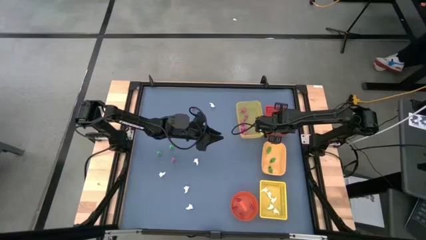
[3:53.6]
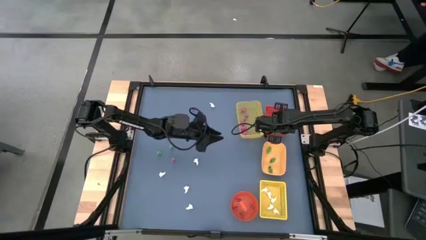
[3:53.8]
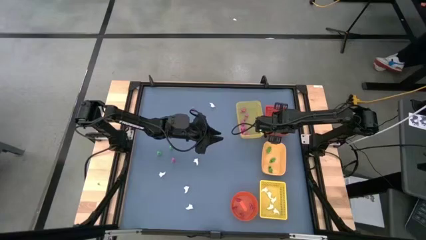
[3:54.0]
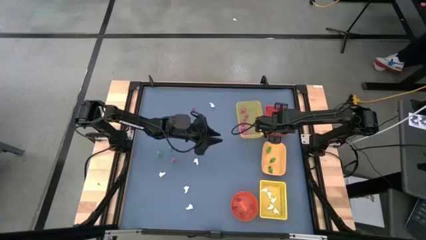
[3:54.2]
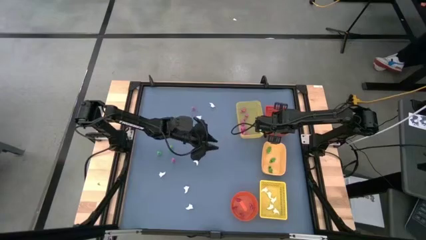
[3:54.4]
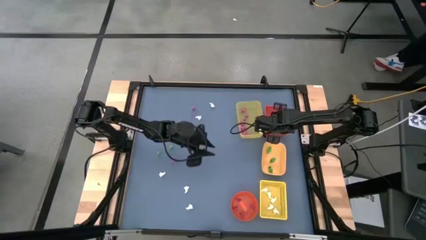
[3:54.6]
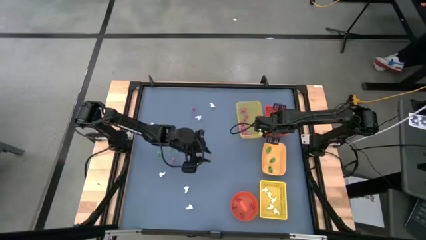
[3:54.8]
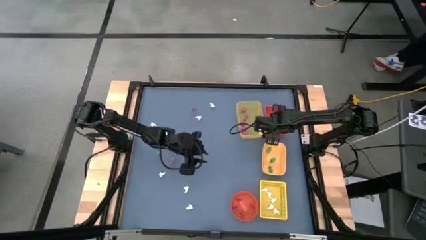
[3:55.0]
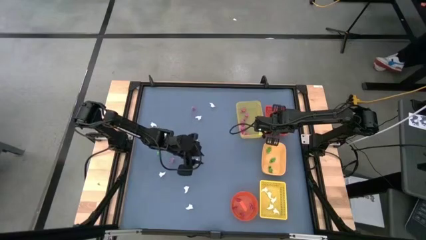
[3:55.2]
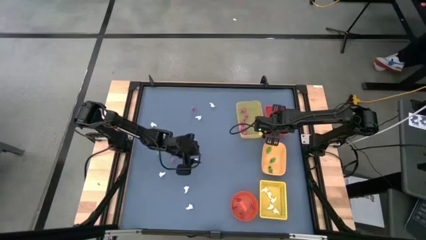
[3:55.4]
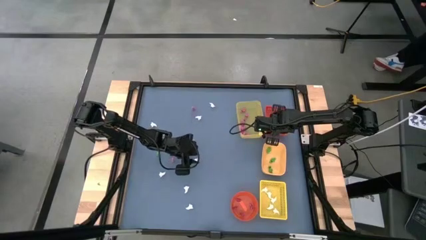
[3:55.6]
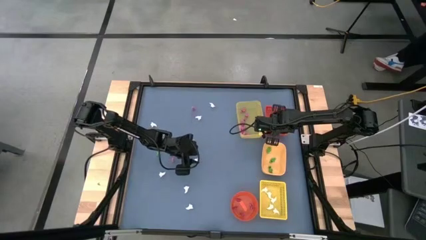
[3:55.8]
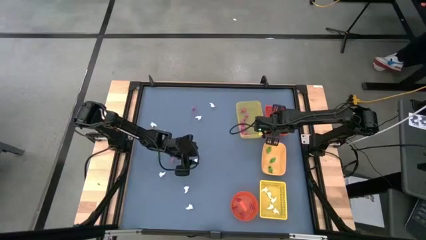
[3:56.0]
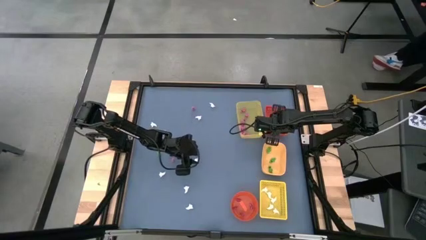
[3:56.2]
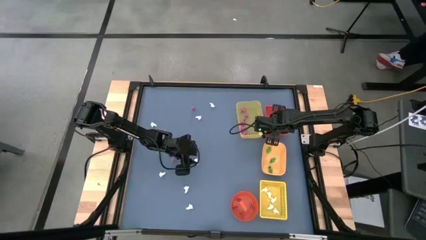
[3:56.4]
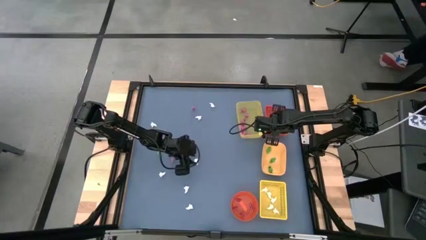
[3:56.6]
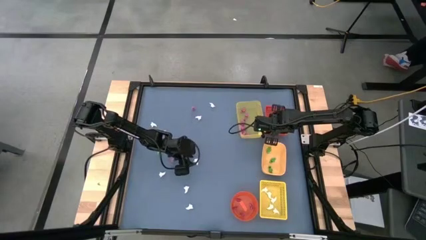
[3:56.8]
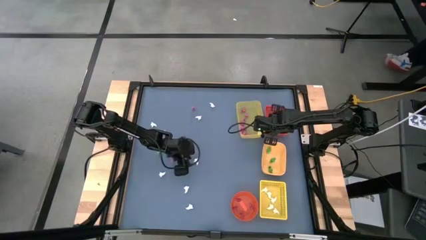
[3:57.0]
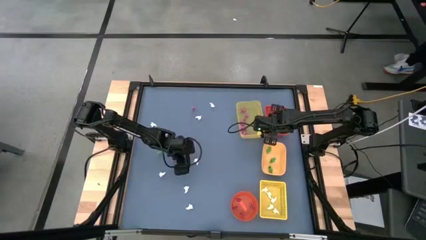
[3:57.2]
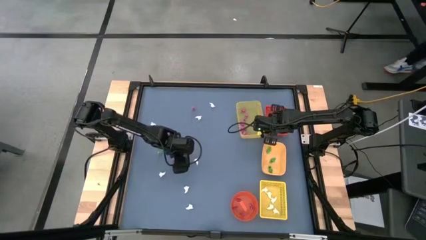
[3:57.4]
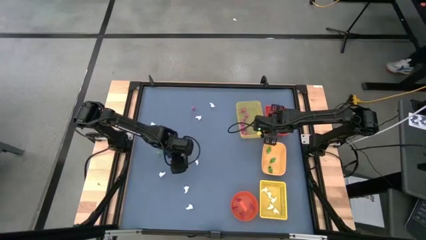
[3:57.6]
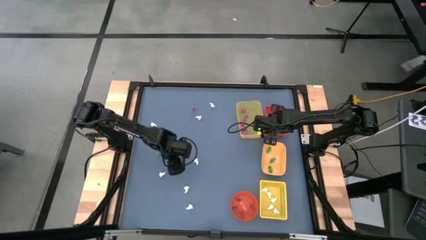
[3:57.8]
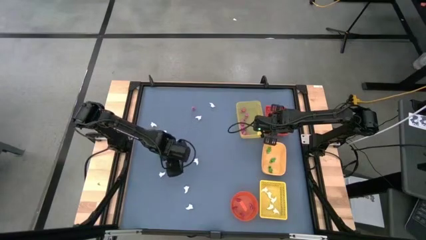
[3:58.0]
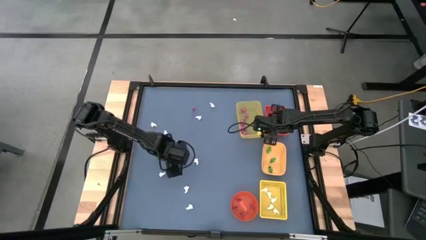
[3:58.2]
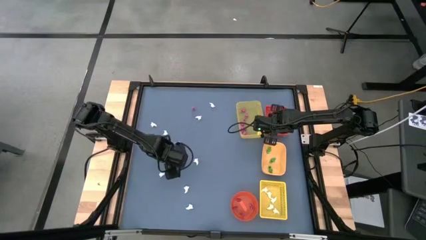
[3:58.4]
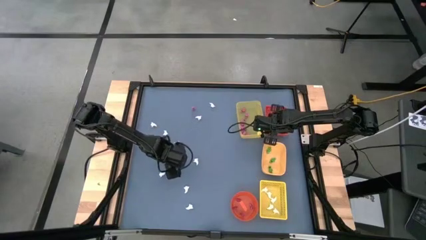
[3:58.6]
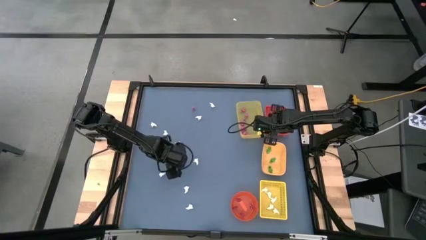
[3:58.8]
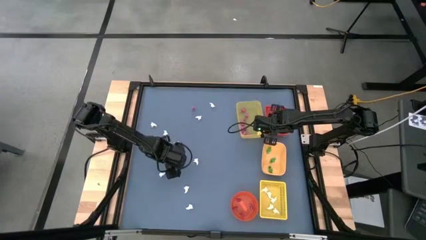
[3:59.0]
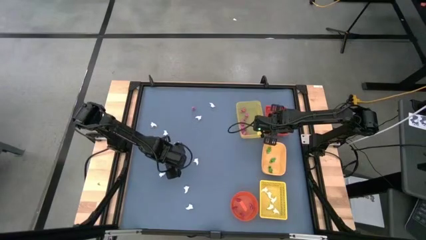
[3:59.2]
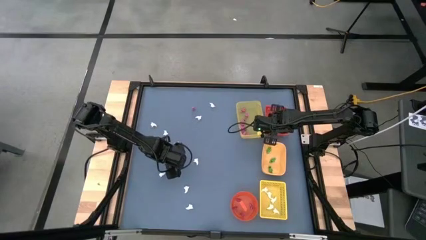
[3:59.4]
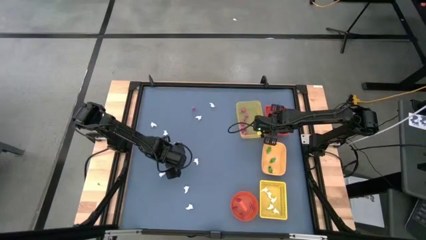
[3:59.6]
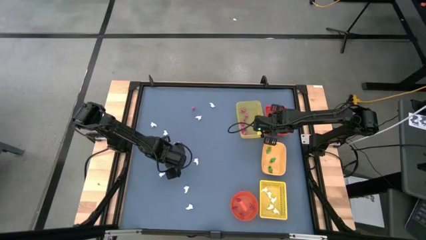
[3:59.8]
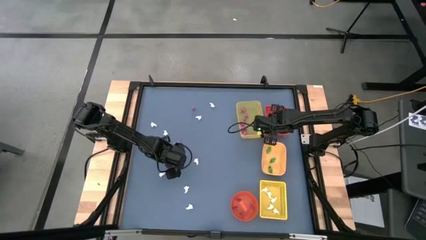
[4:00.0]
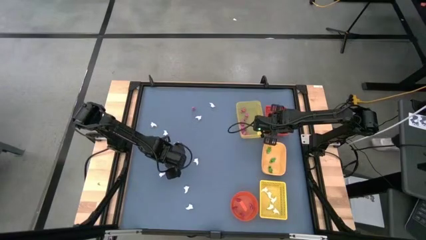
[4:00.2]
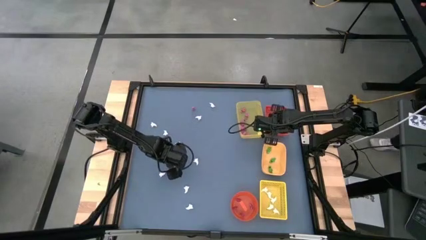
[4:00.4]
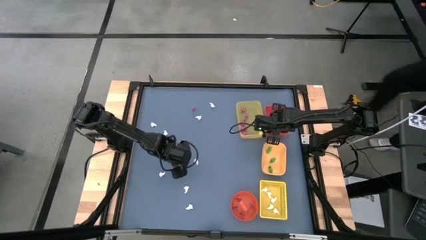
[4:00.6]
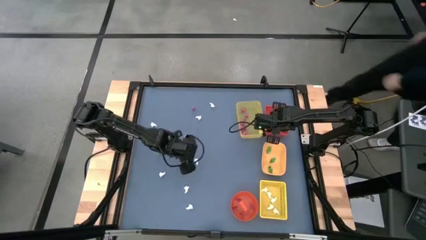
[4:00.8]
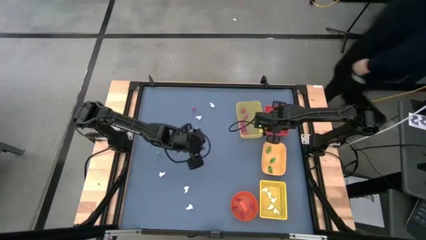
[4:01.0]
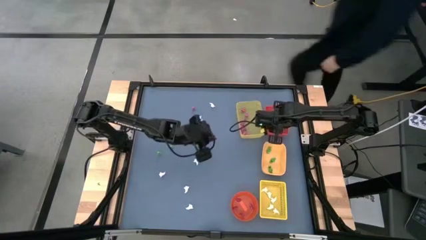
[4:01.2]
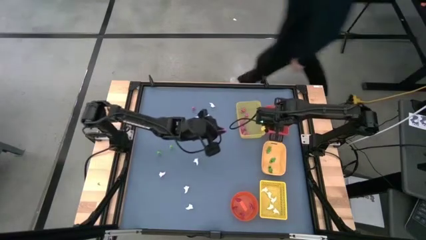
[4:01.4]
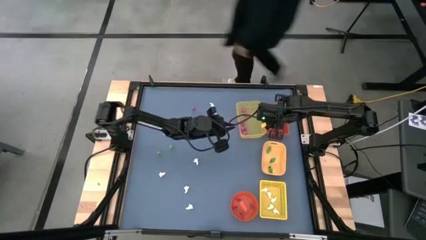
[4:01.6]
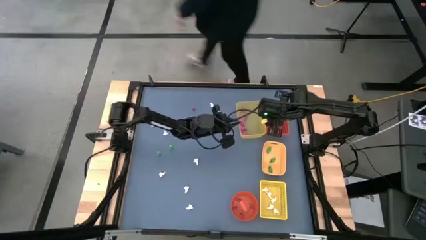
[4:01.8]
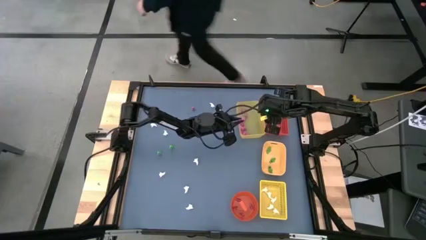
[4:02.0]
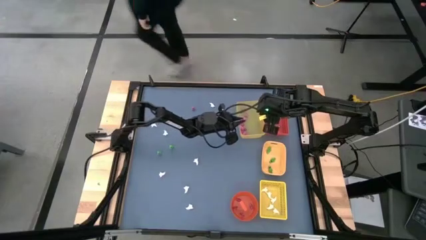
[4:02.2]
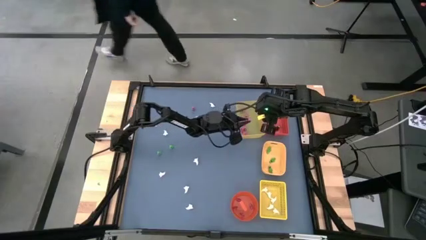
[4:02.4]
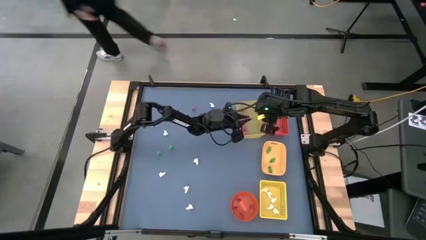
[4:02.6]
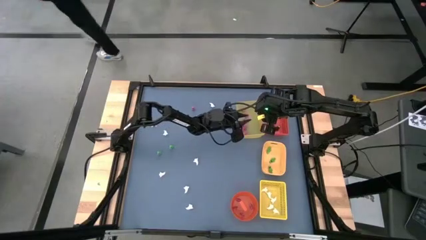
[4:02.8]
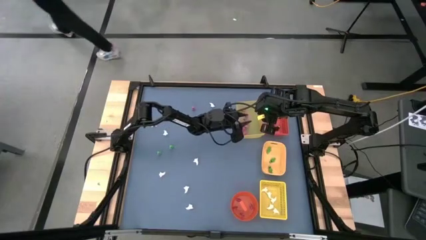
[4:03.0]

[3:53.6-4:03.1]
Task: Sort Halloween decoration
Put the pink skeleton toy into the top yellow bin
